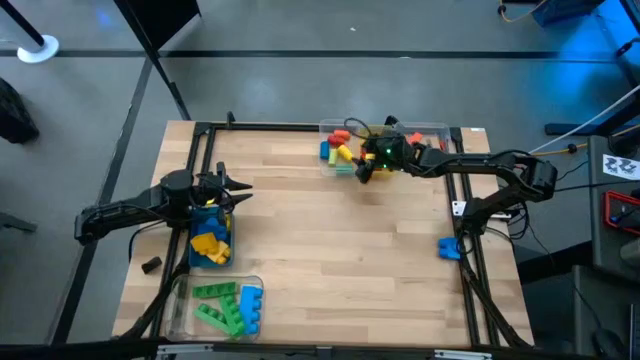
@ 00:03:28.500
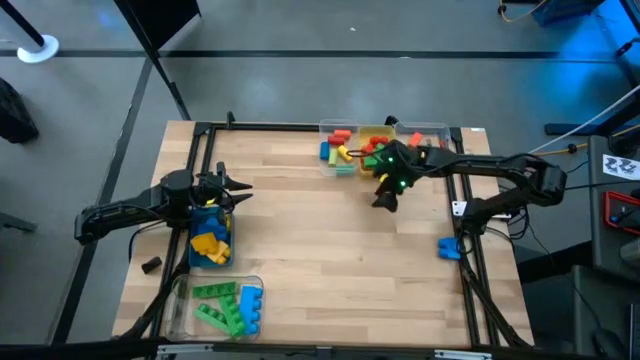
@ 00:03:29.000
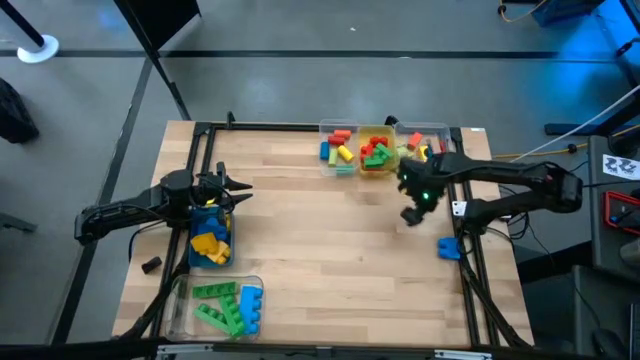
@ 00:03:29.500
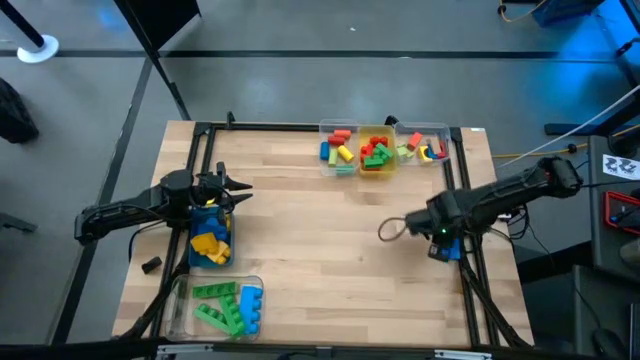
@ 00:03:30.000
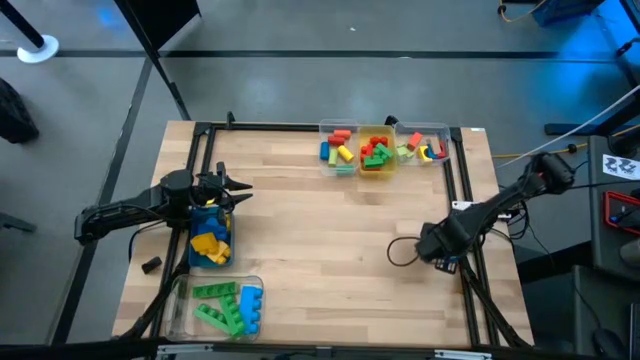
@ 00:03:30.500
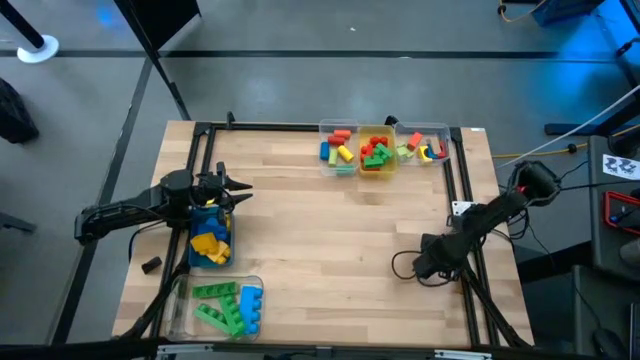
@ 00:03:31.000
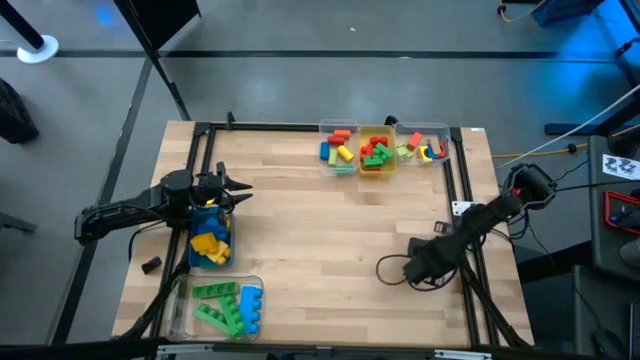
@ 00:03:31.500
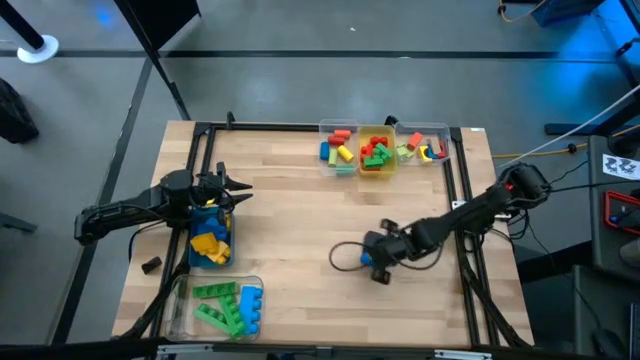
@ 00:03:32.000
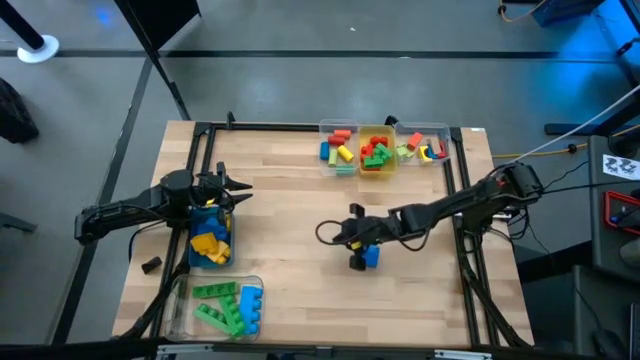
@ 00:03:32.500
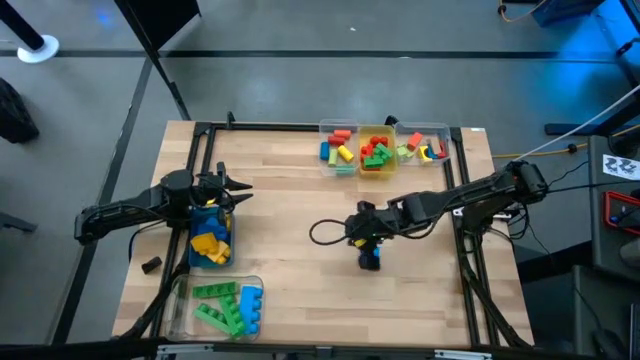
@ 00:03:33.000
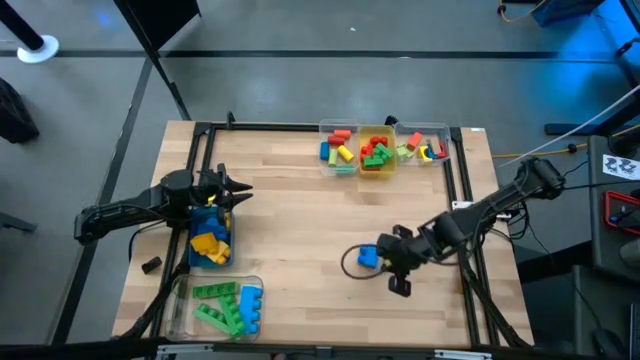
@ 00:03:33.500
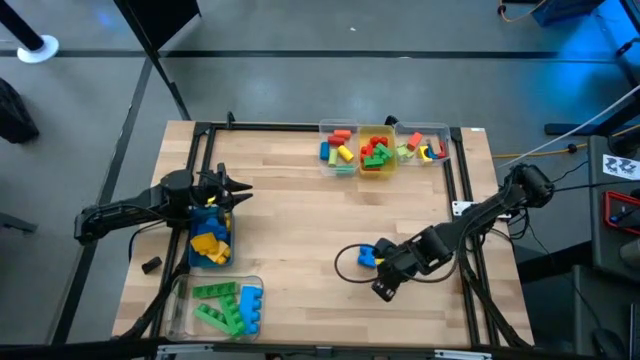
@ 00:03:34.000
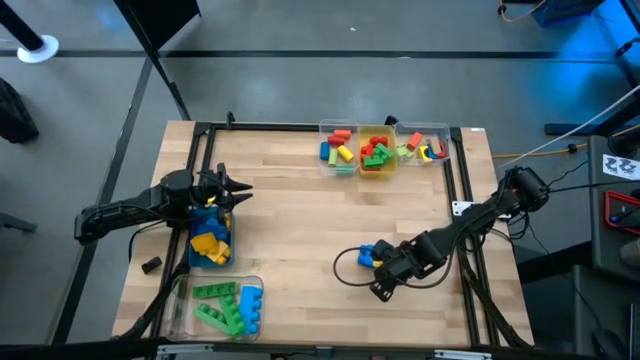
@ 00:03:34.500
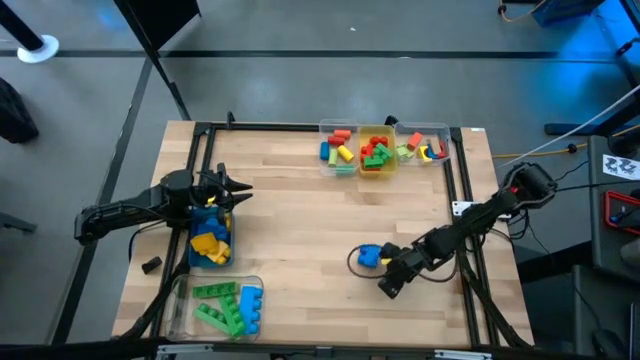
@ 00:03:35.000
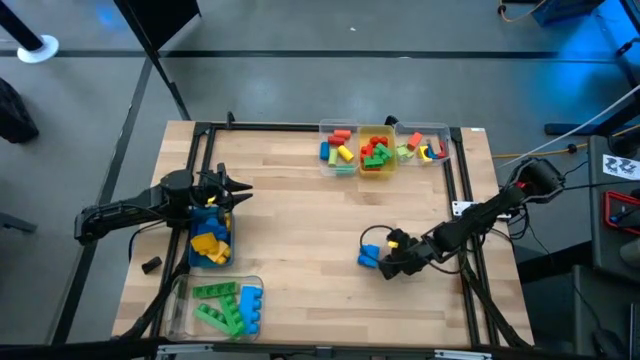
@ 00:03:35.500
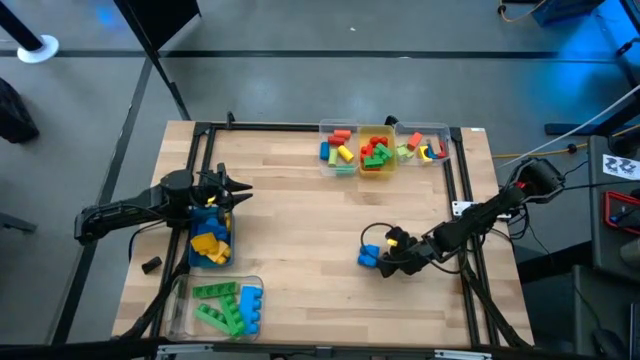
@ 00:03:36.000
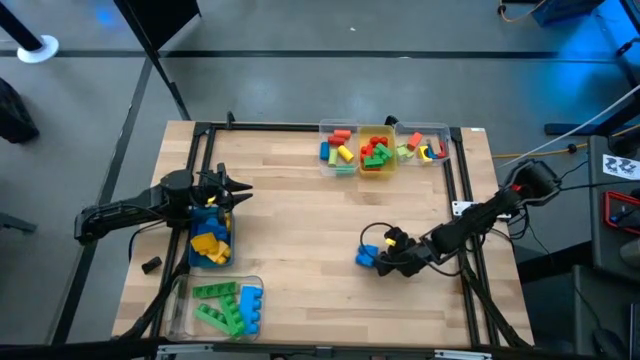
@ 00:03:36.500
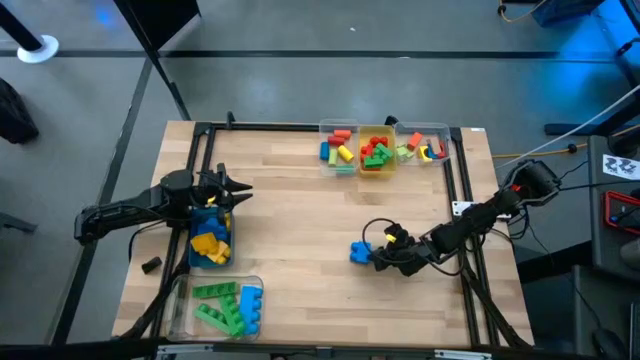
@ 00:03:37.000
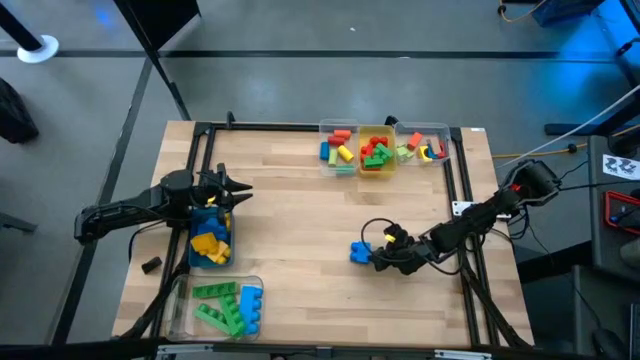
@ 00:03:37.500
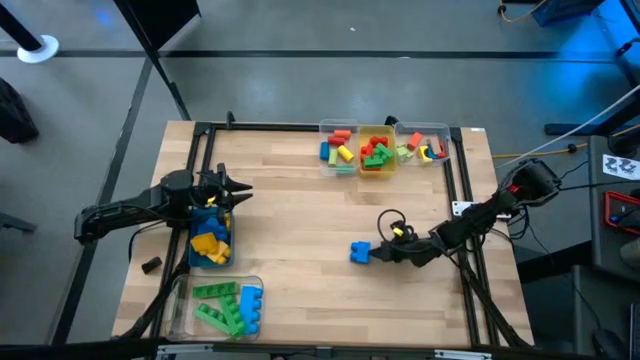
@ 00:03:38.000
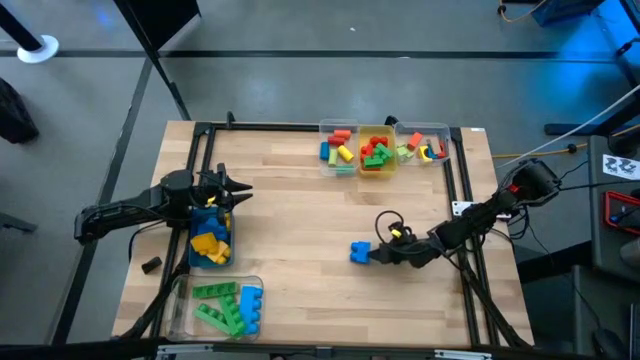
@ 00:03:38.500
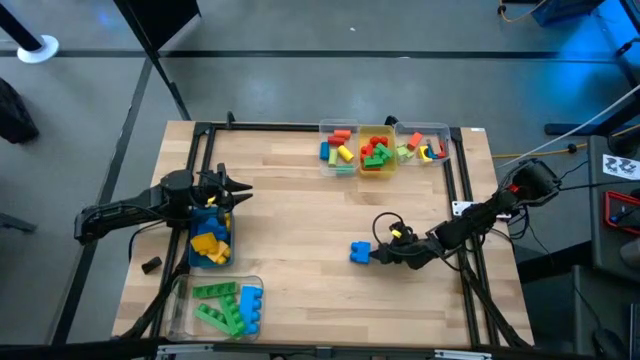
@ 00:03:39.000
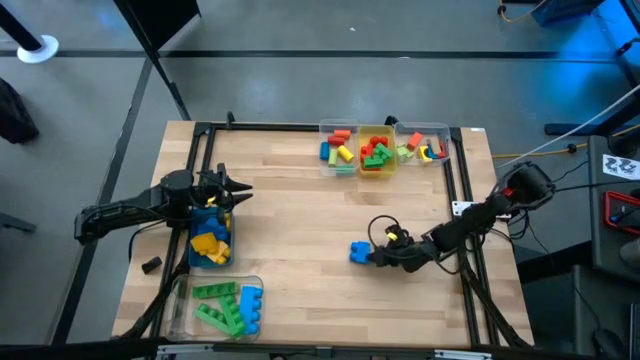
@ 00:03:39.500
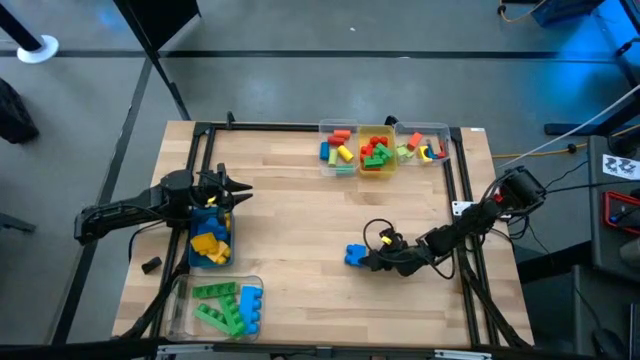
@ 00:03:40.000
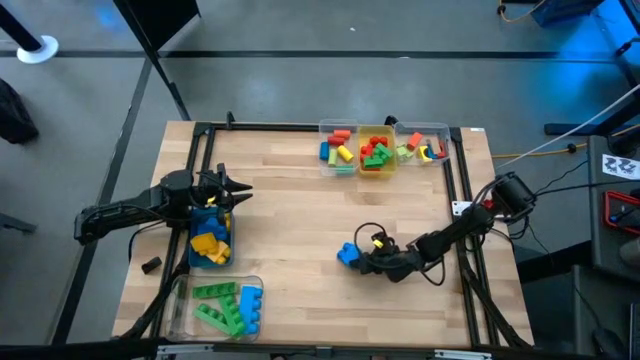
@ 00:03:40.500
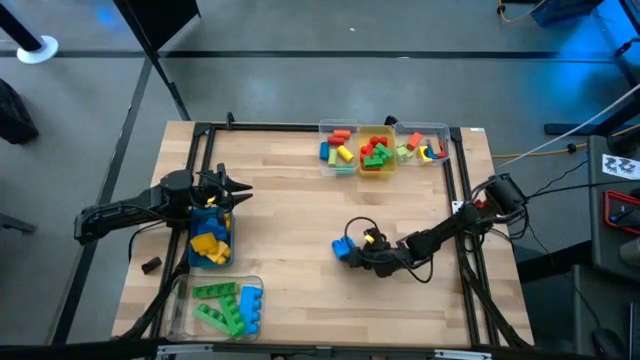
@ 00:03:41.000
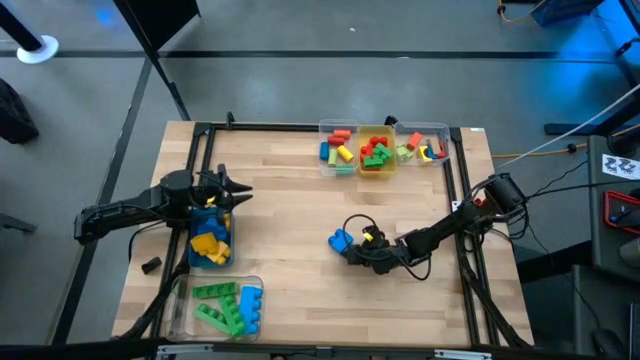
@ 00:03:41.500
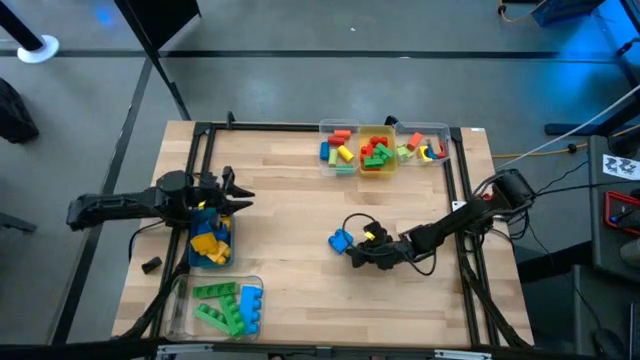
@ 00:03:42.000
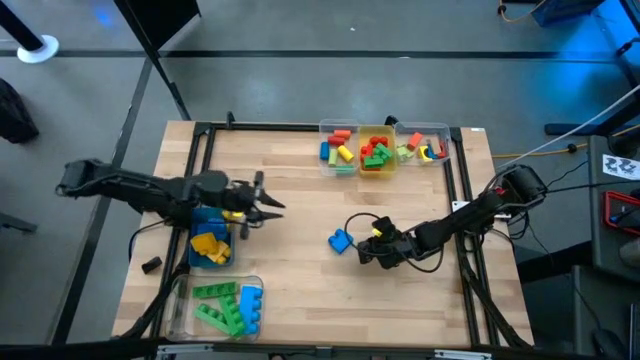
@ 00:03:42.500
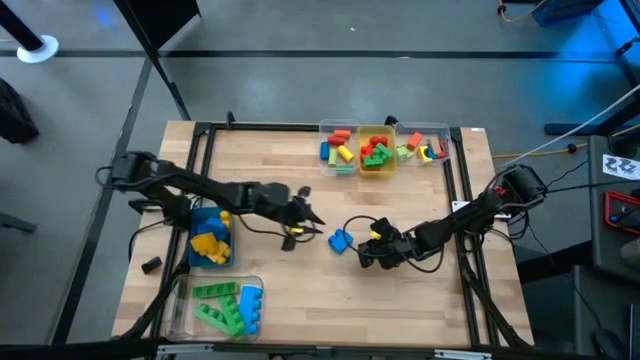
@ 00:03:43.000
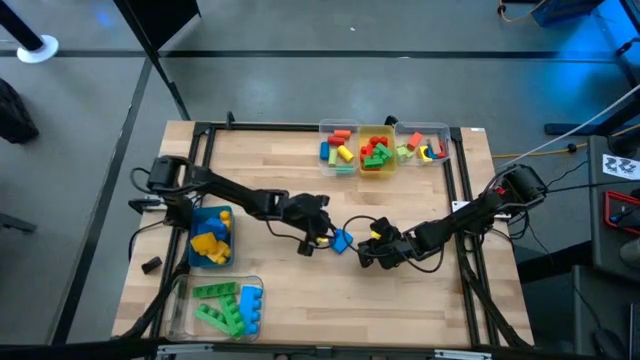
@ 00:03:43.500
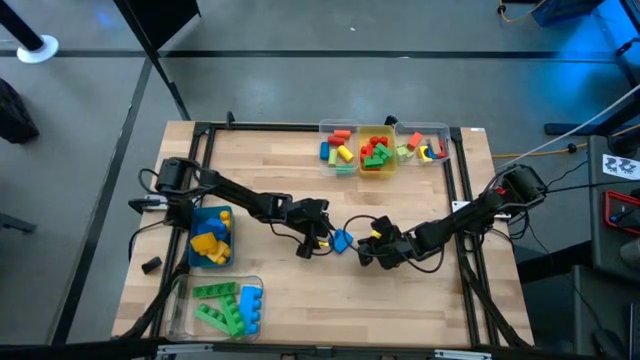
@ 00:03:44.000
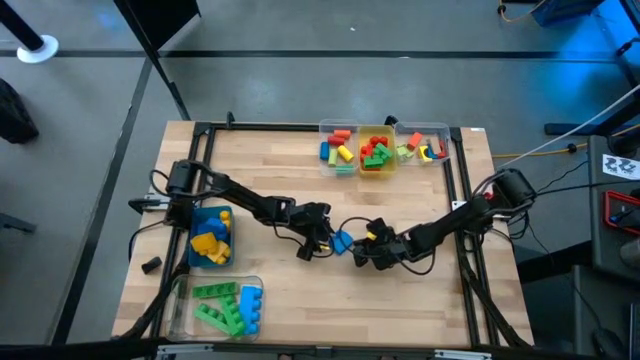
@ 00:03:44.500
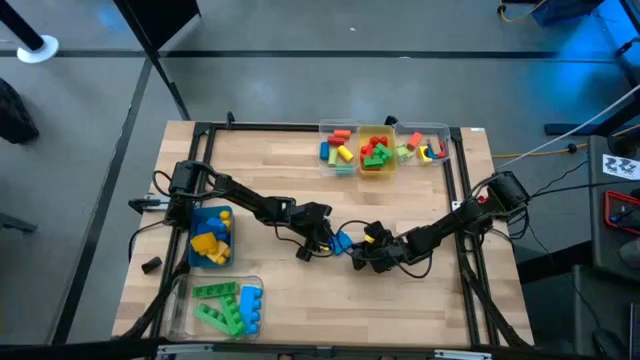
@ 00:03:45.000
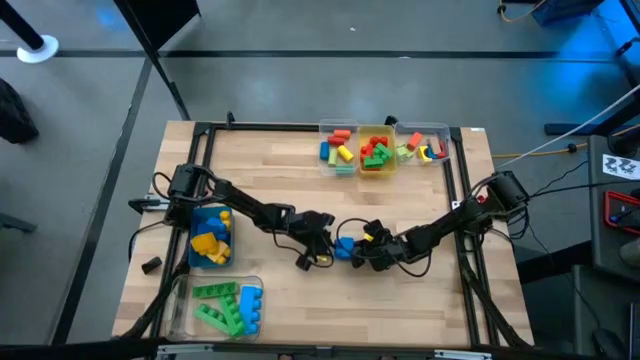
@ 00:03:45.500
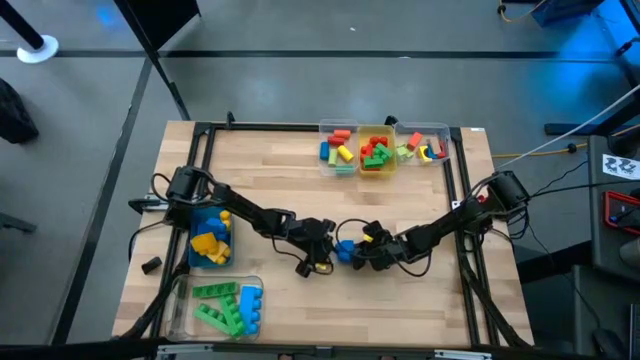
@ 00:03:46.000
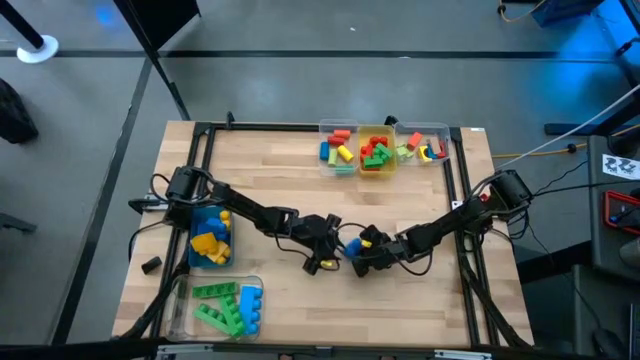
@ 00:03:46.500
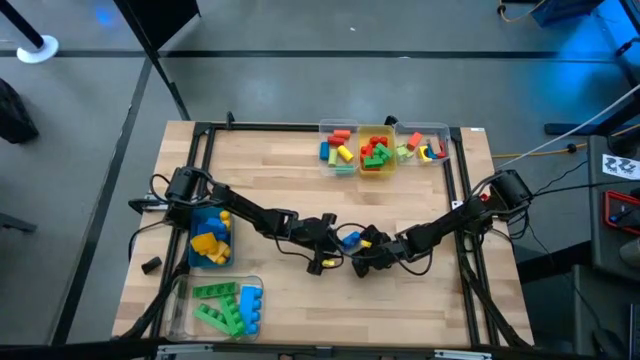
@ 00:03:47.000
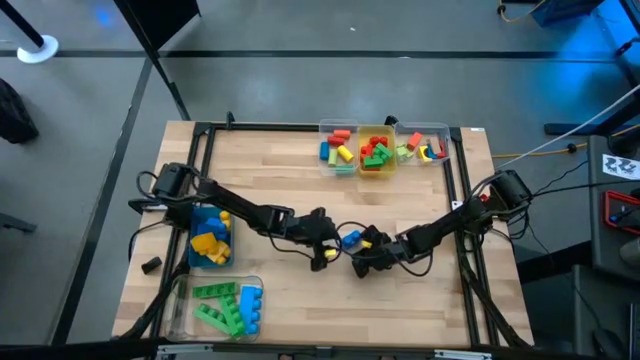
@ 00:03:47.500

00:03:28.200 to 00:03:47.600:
Task: Sort blocks by size
Put the blue 2 stud game piece into the blue bin

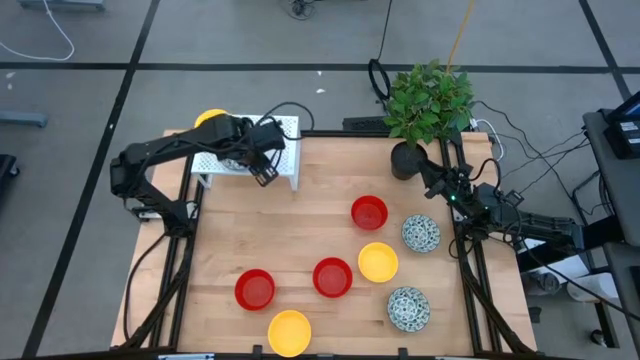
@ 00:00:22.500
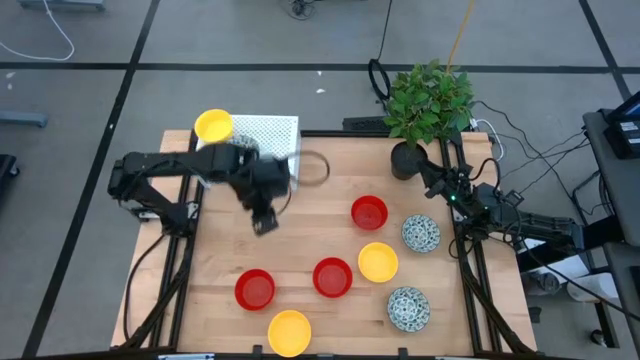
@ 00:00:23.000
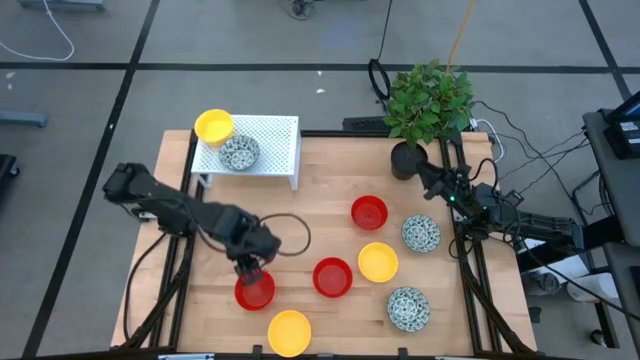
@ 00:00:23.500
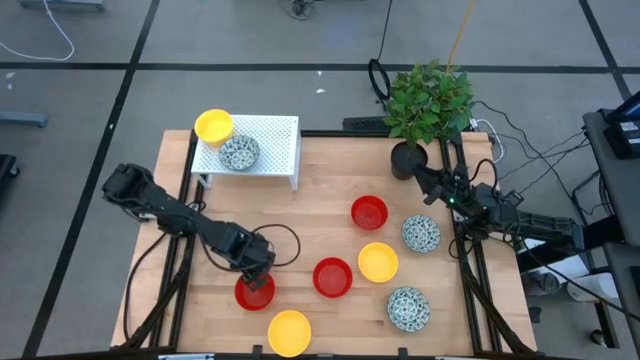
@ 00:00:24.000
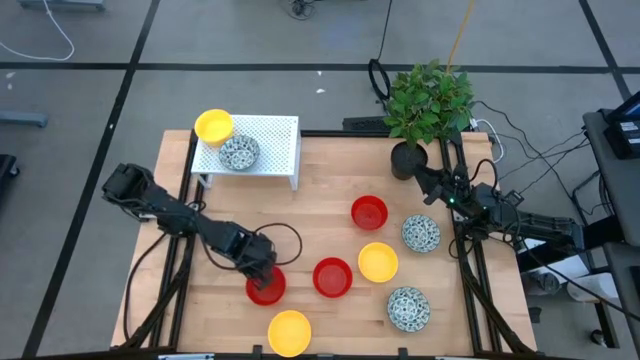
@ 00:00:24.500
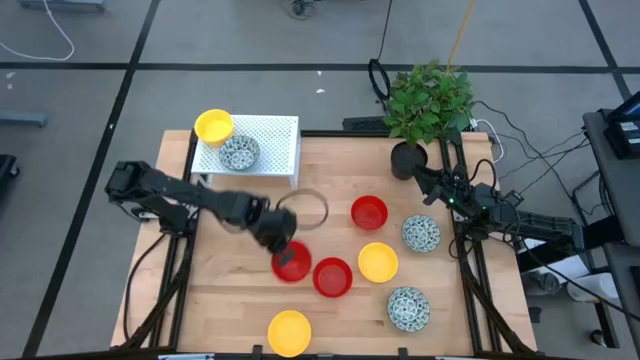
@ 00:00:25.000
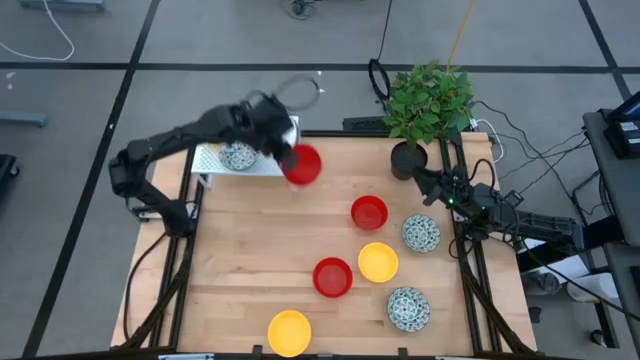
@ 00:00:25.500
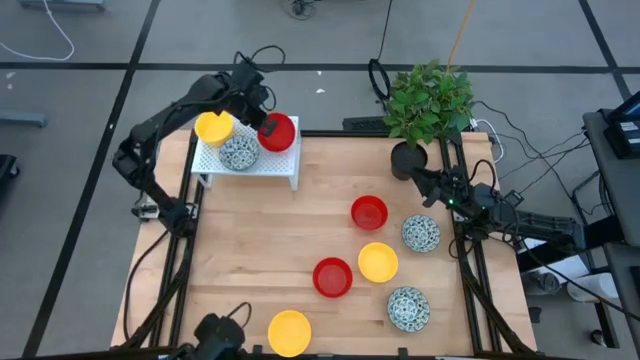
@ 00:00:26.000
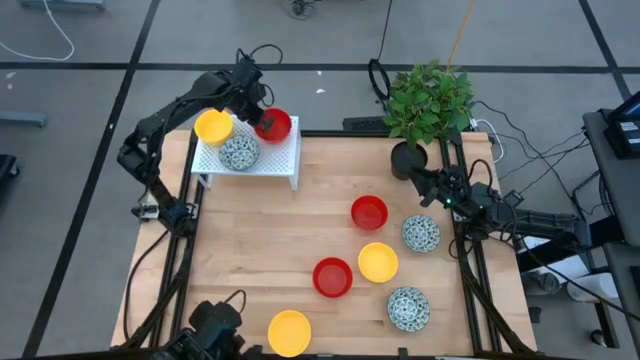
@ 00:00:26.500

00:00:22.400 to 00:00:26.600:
Task: Pick & Place Mini bowls
Put the red bowl on the shelf
